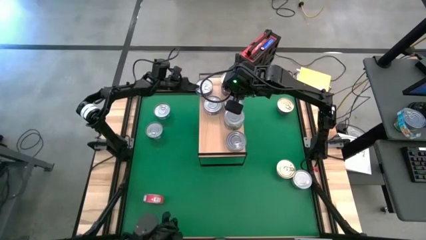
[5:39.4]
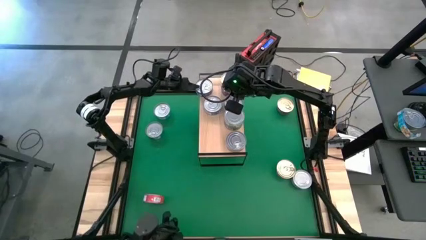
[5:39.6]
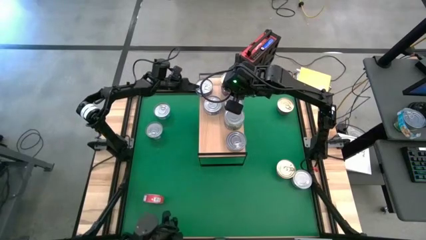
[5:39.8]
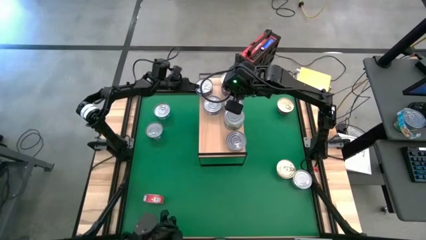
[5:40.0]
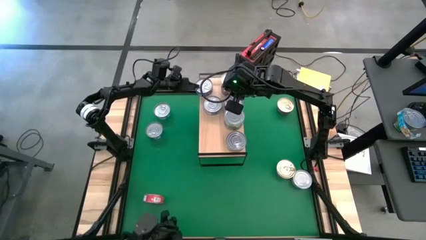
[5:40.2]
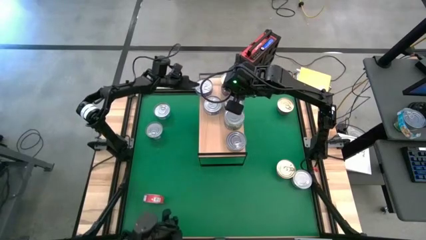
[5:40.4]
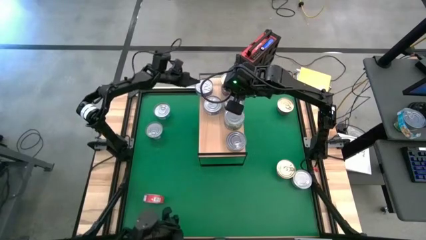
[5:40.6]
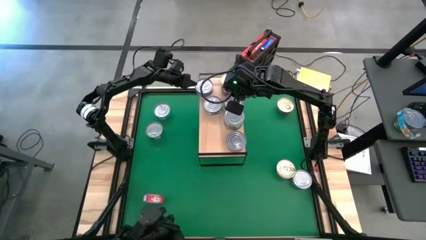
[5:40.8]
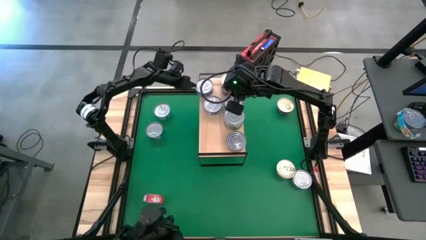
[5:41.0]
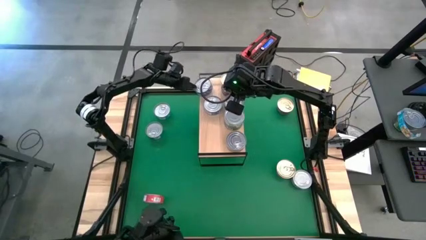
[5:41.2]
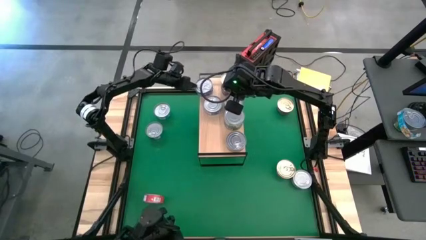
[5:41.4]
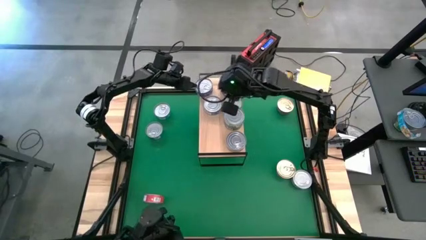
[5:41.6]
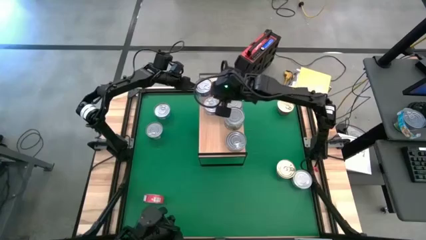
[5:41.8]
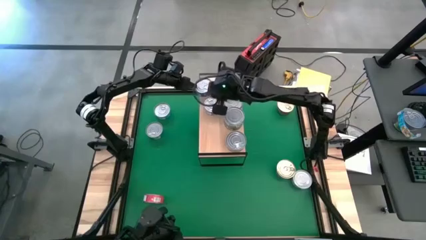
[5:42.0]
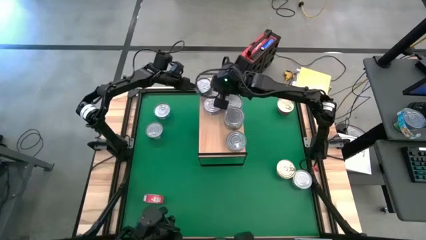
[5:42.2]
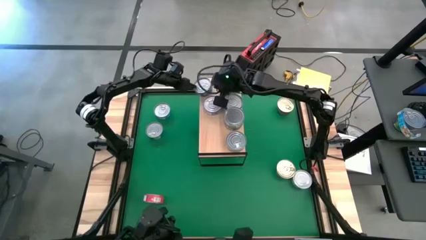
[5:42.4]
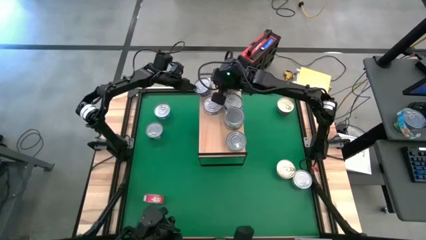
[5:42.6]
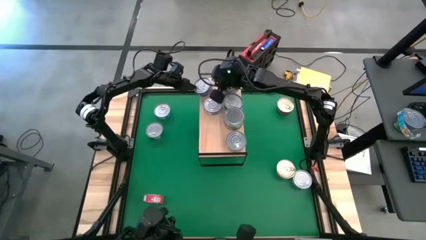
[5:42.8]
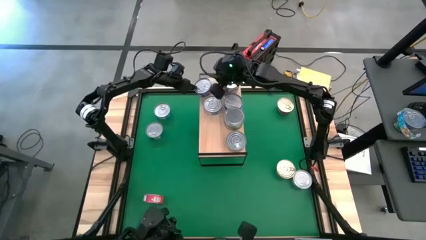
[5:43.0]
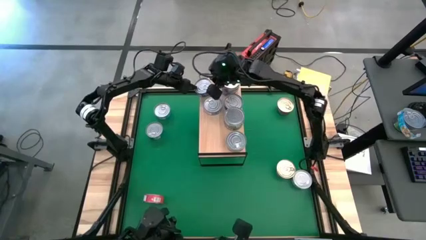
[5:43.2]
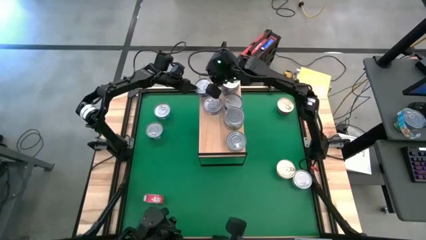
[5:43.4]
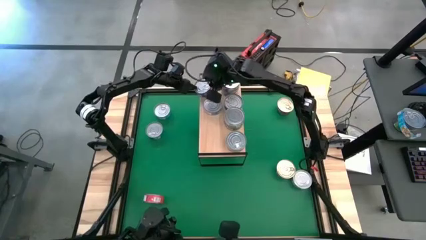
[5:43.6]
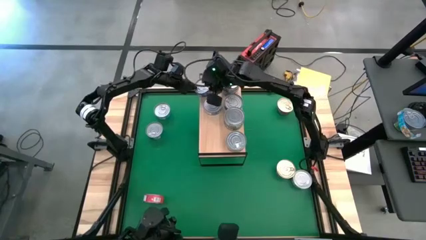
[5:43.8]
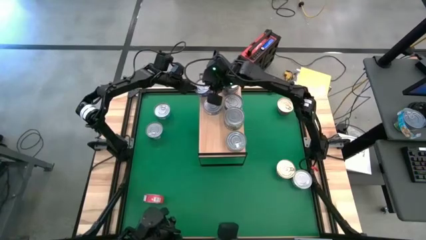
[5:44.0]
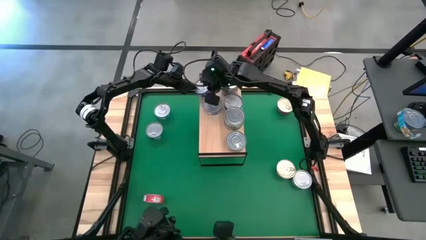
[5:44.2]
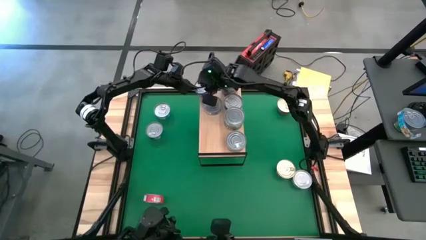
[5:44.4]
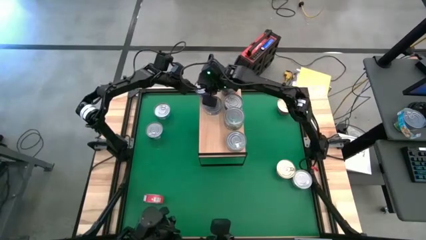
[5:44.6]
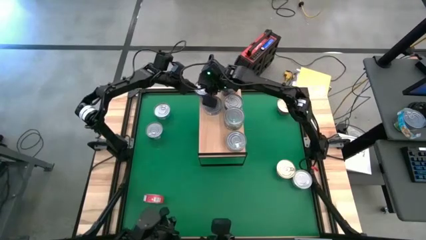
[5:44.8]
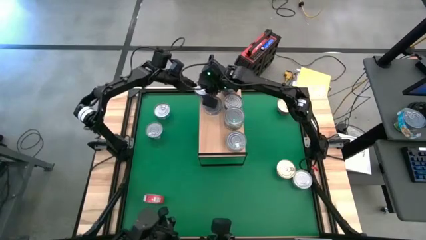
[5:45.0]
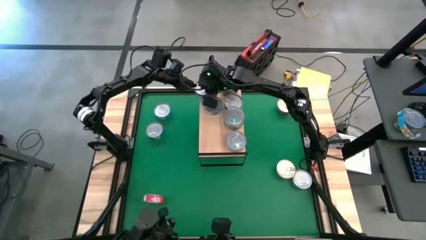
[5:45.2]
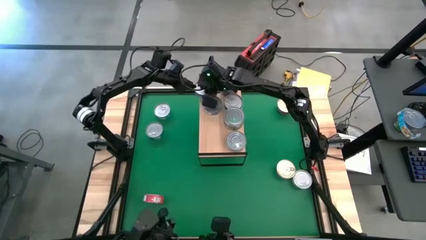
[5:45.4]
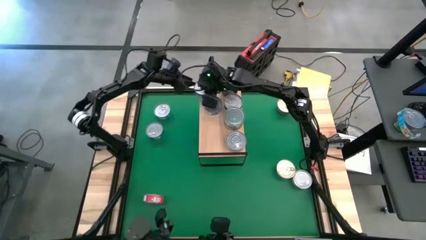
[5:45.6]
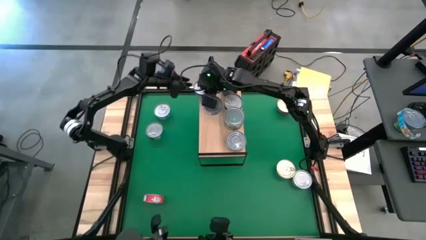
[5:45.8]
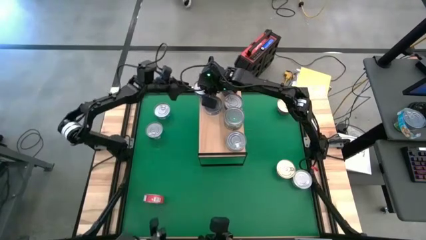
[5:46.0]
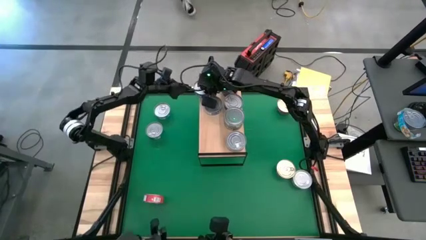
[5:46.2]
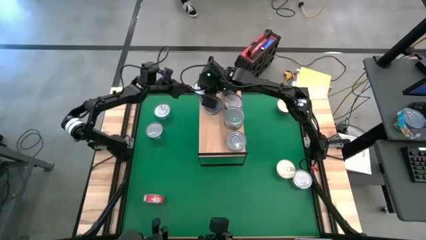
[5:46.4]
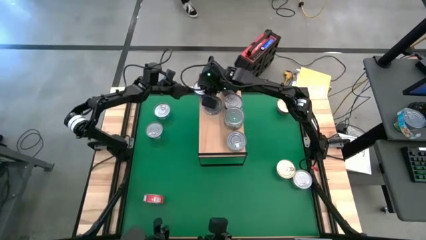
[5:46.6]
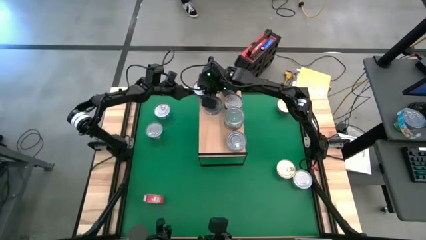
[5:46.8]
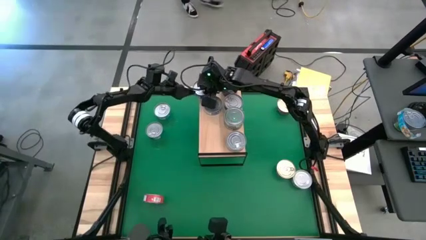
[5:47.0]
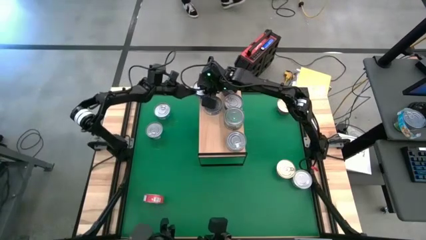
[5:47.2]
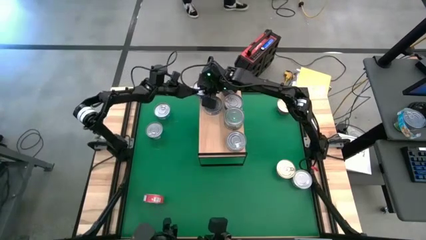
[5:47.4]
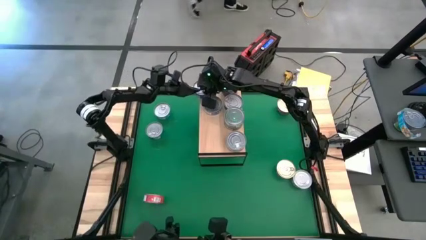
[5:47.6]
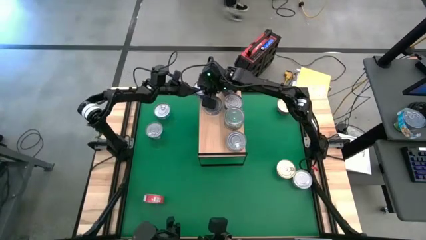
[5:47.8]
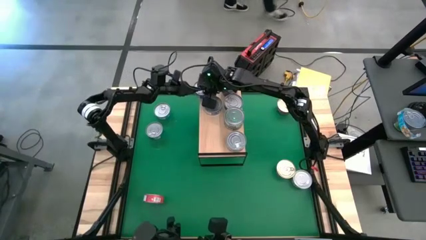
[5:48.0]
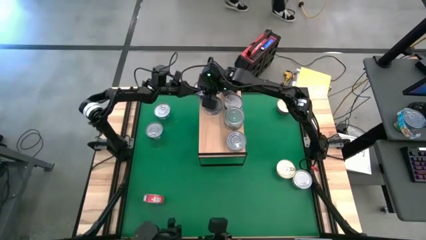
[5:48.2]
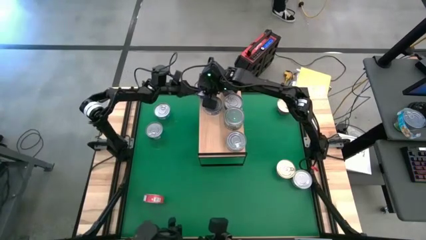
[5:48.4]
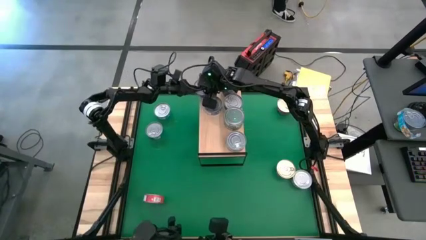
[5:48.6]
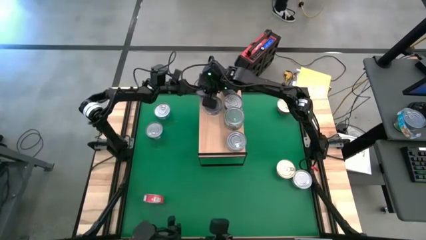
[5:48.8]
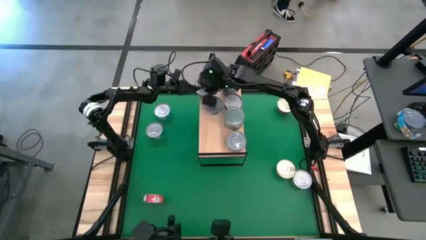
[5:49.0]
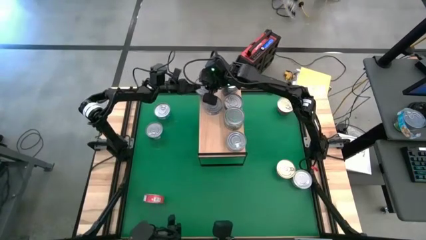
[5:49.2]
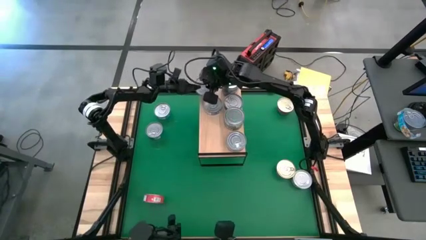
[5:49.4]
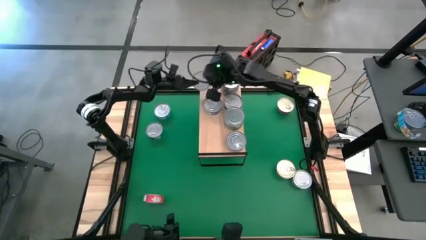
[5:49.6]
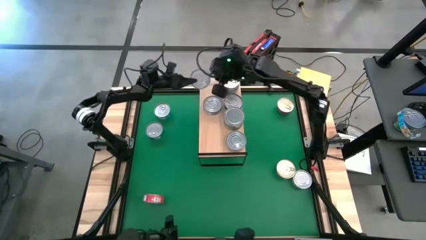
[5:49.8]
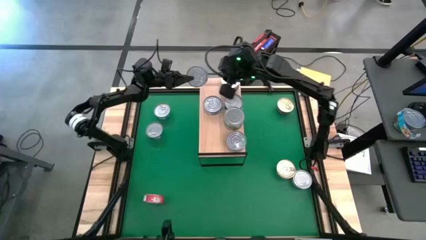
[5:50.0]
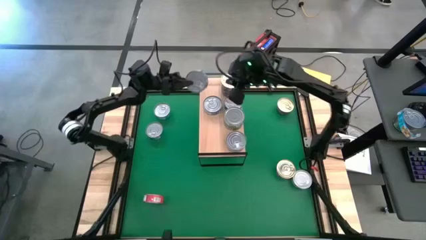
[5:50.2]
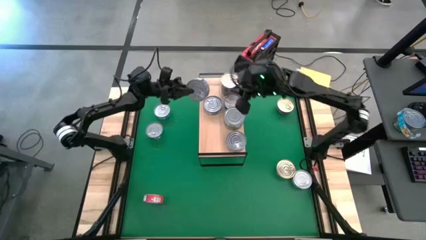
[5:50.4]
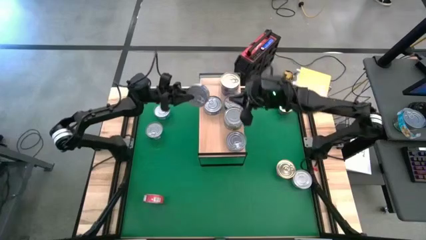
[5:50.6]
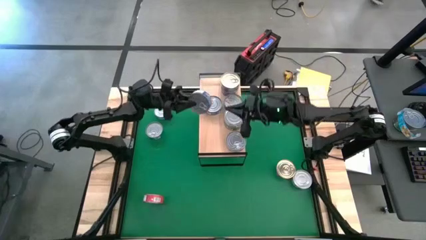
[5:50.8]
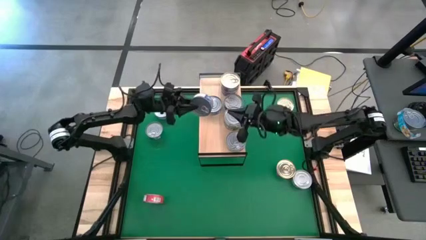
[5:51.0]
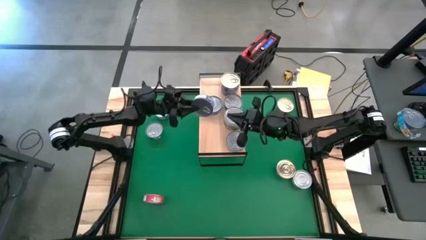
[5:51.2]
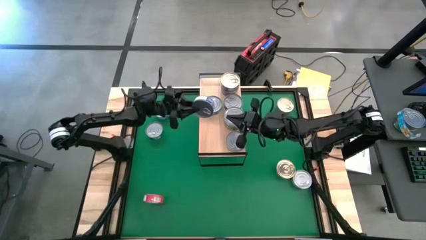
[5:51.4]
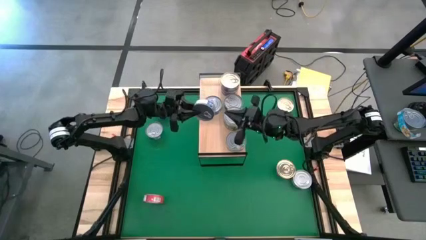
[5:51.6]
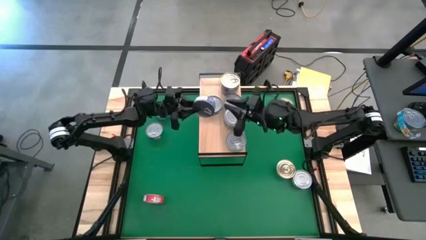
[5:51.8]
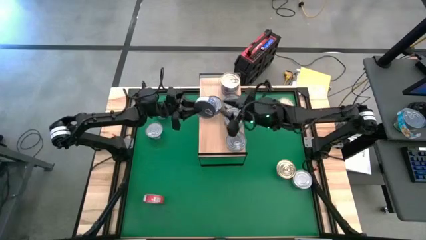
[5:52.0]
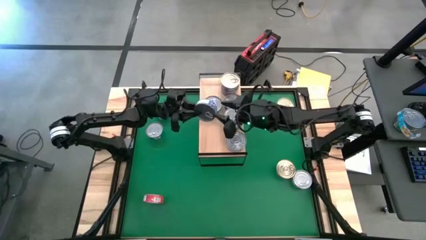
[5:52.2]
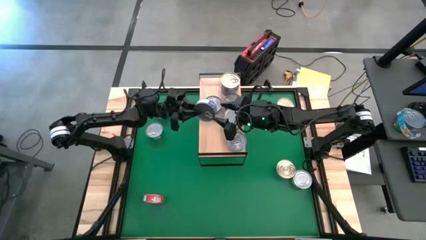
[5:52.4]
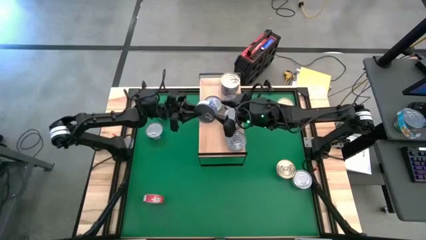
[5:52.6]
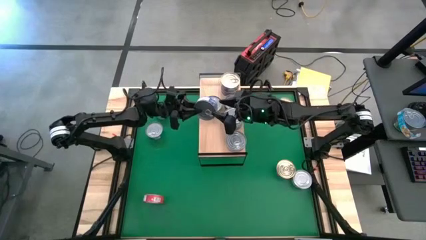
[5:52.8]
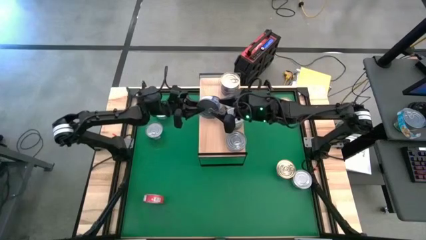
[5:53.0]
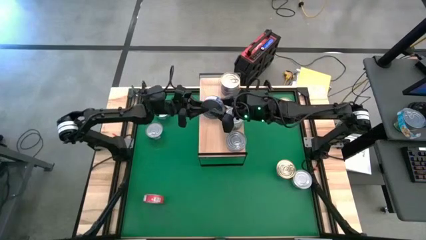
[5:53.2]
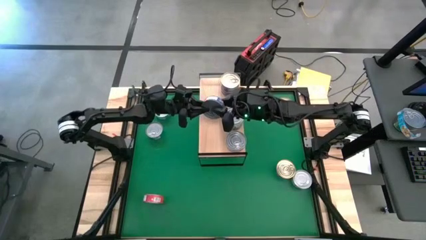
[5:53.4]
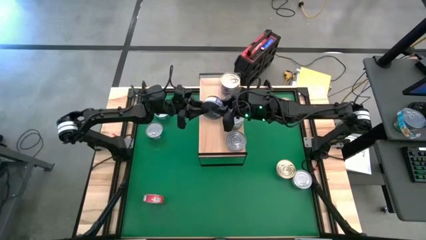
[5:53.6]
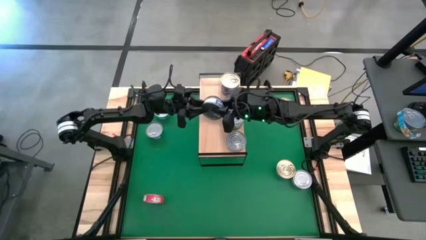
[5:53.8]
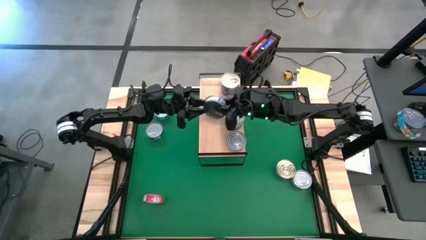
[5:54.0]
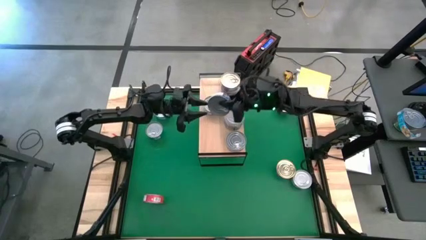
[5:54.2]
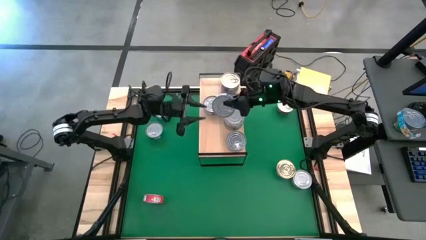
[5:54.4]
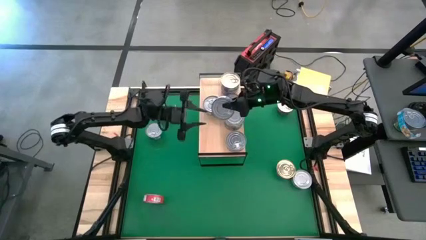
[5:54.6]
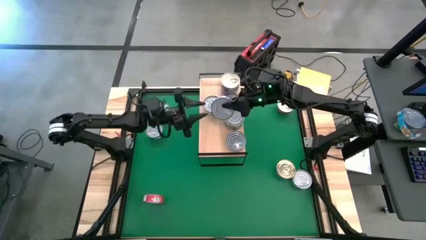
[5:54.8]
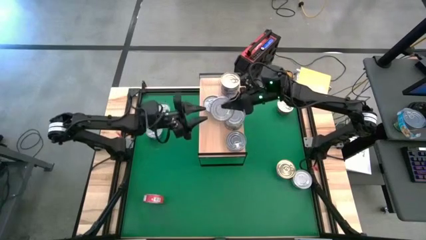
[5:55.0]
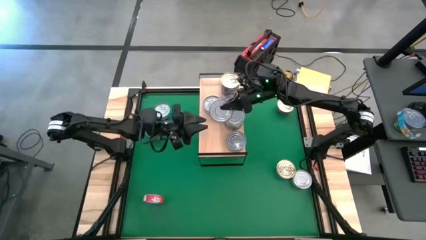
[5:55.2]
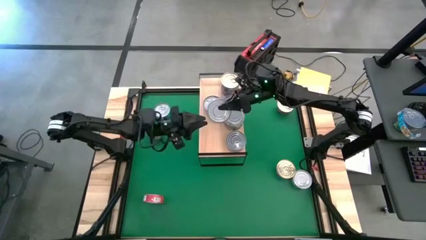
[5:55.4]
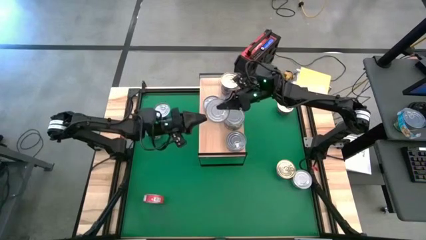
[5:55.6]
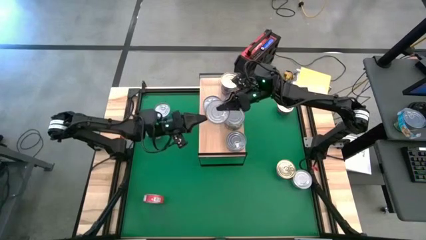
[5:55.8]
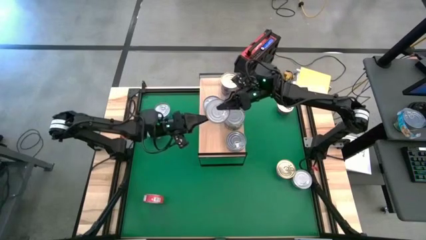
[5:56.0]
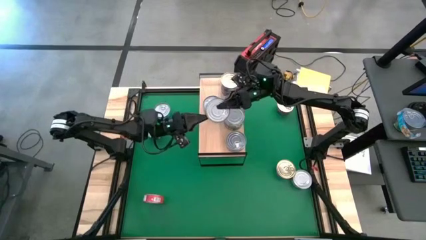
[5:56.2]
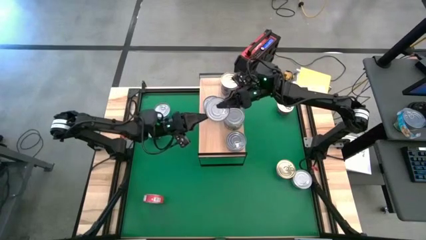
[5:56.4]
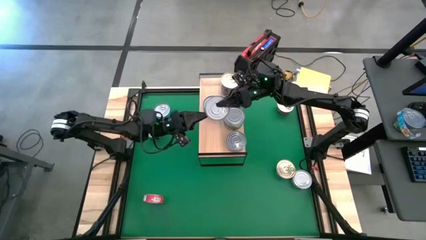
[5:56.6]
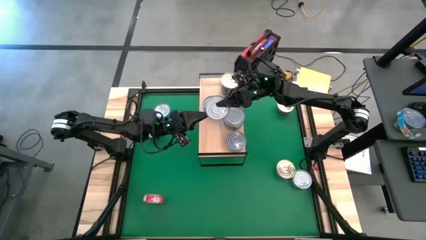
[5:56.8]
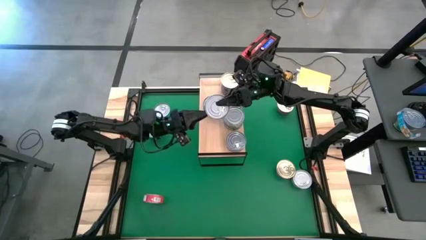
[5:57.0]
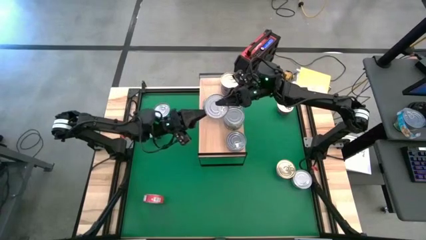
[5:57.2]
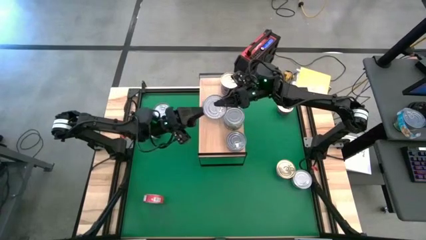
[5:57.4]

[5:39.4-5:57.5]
Task: Stack canned seafood by type on shelf
Stack the blue tuna can on top of the blue tuna can on the shelf
